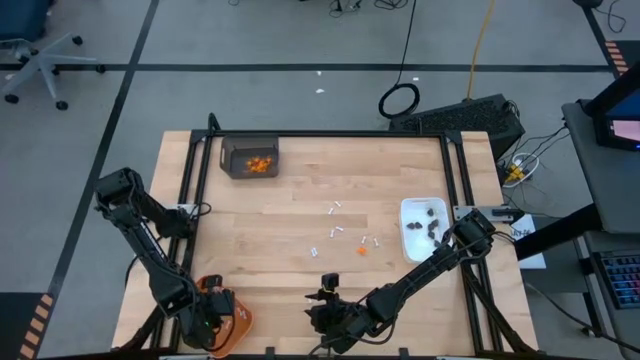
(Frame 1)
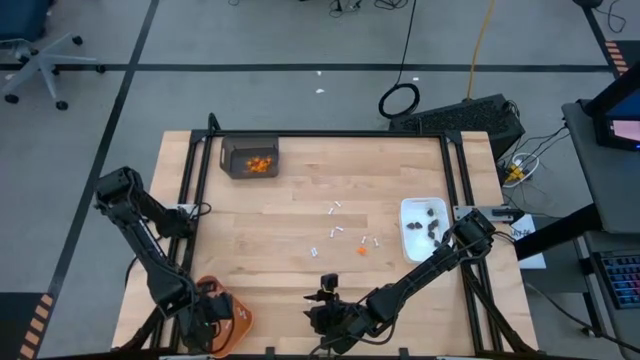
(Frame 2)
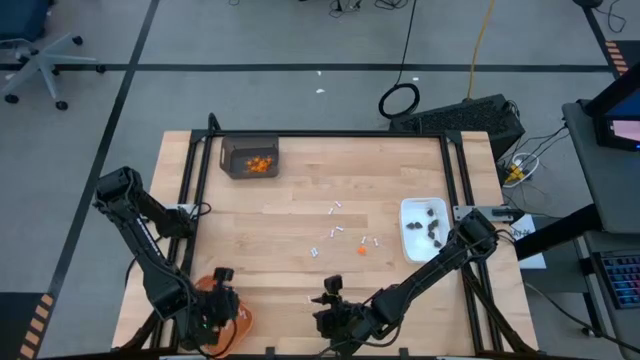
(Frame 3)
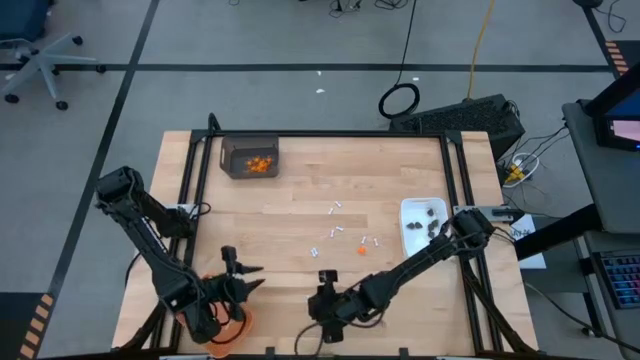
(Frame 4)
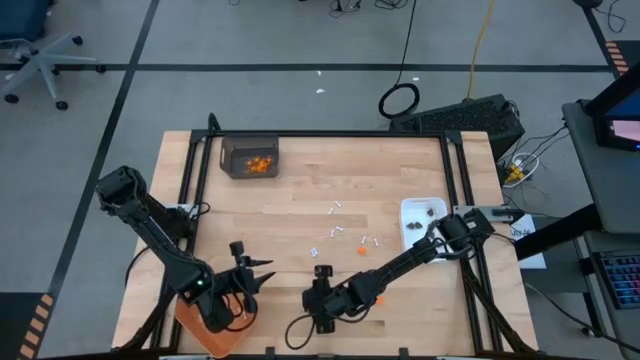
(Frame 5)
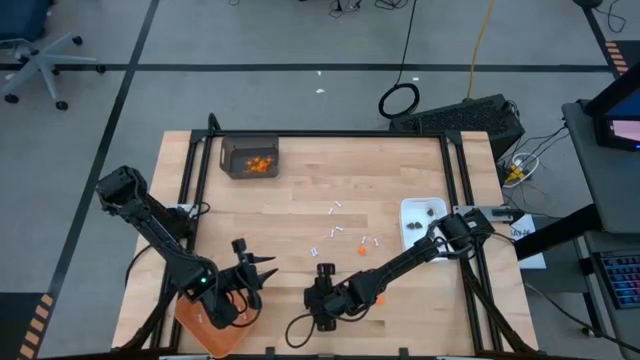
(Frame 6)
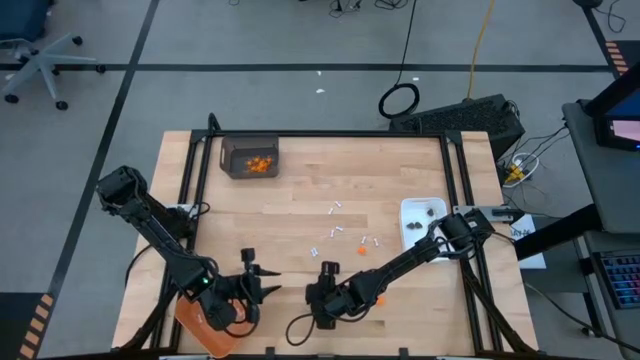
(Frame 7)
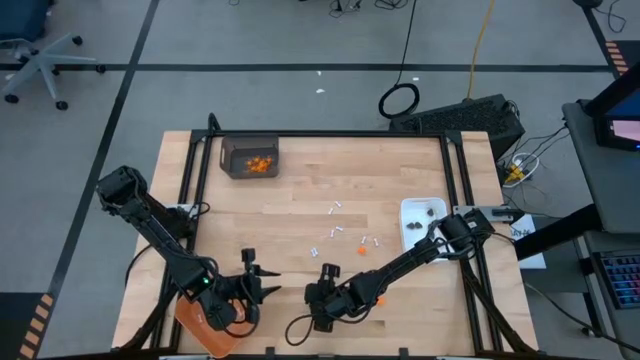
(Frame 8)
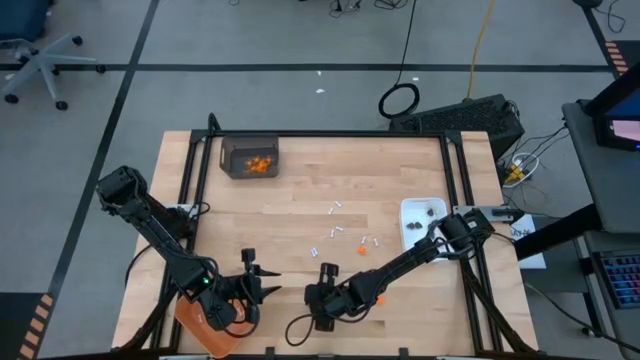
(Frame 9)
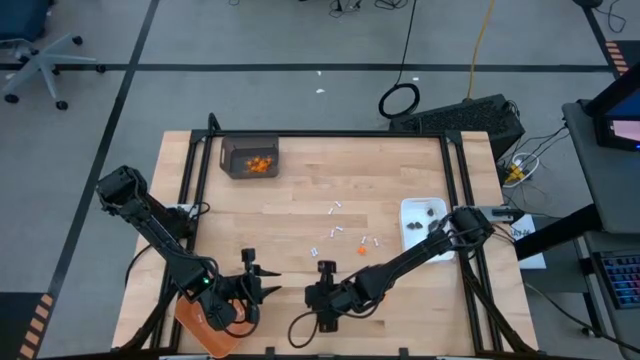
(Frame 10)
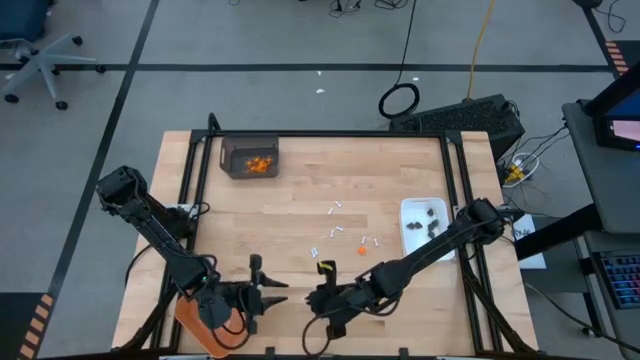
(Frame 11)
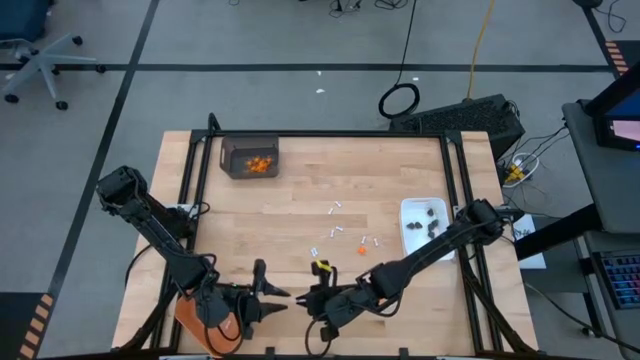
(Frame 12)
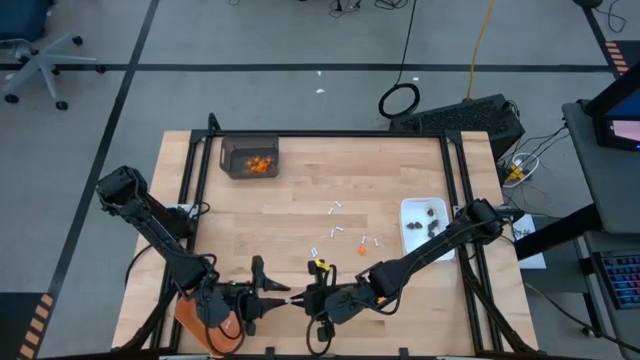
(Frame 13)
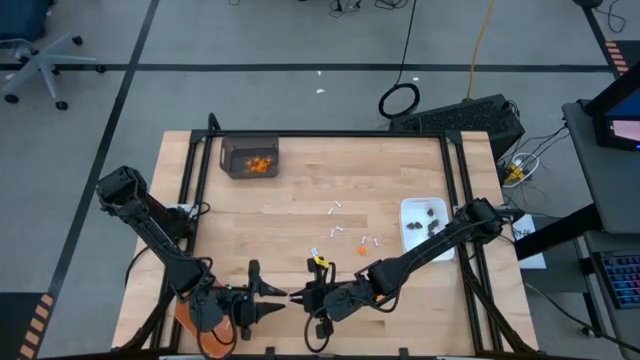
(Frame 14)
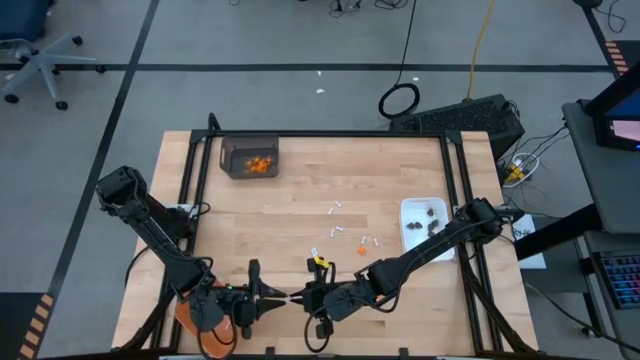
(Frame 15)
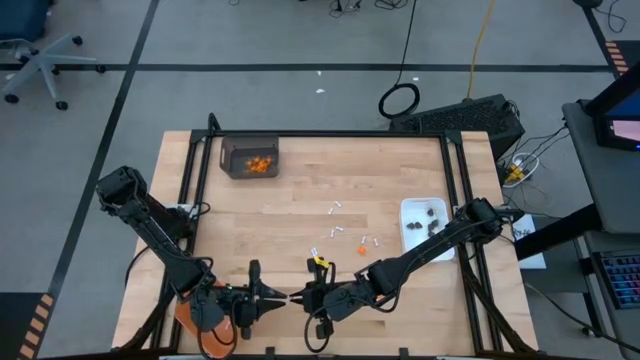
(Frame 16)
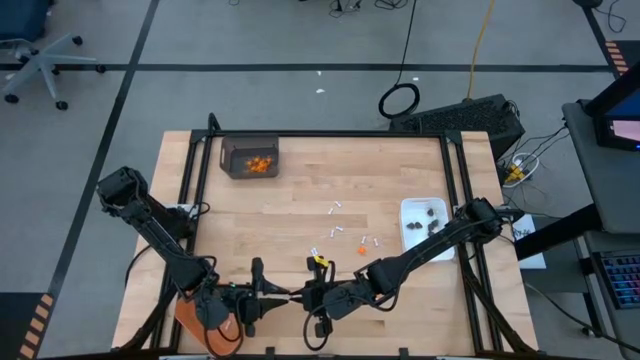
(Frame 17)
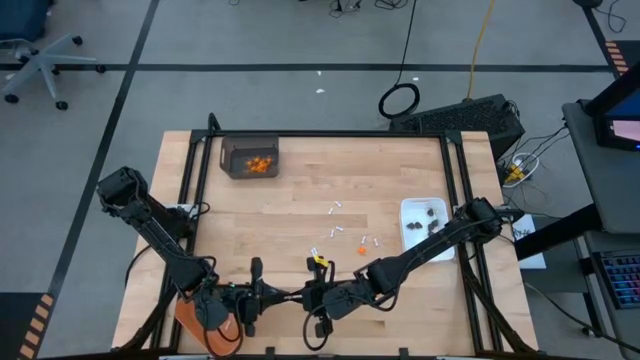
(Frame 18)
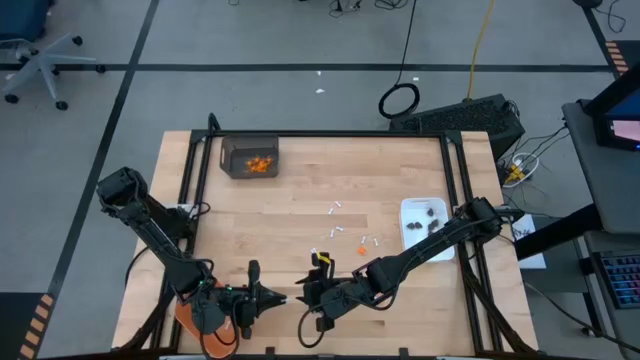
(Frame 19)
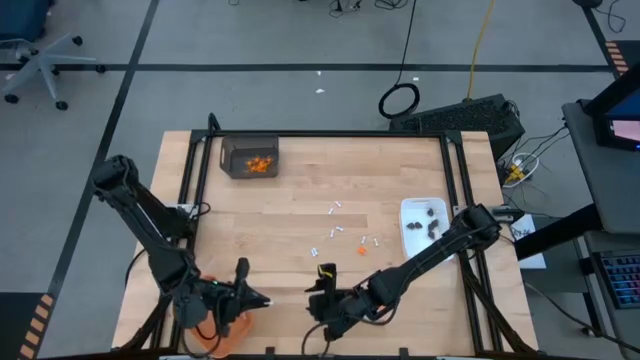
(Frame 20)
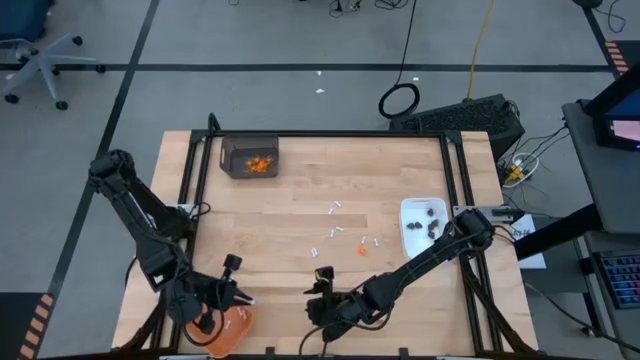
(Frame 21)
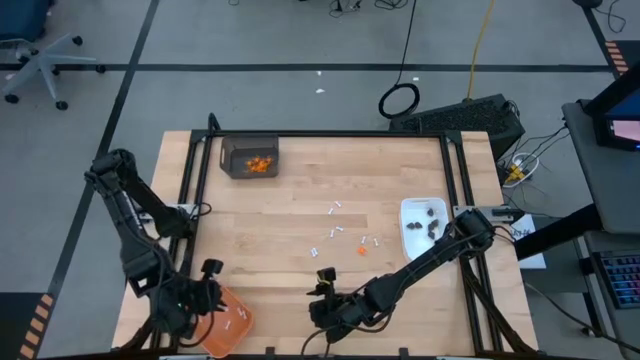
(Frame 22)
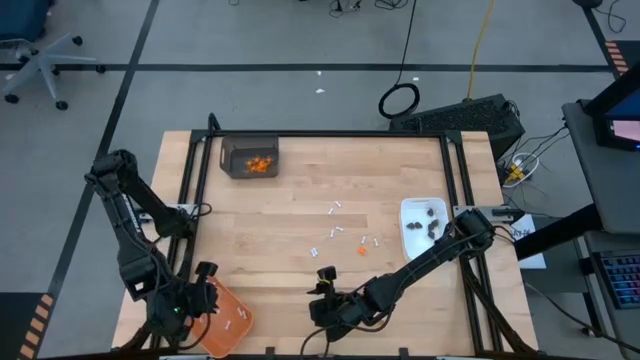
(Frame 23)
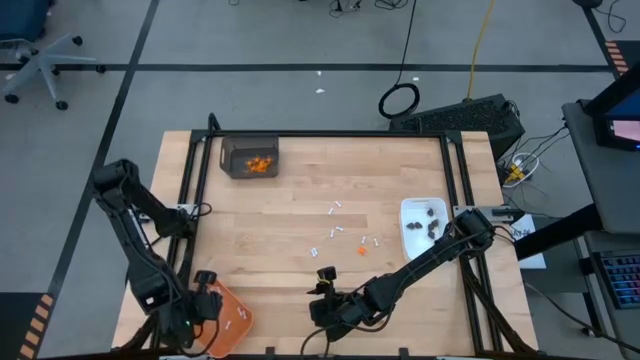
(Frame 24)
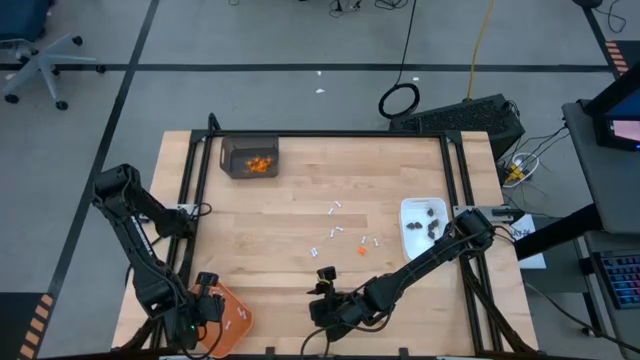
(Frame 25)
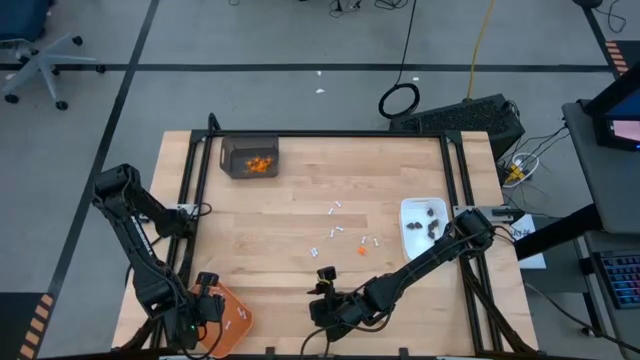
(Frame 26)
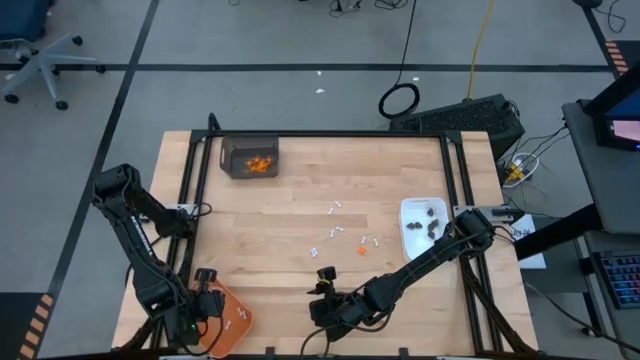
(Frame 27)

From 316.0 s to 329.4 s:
Task: Sort Halloween decoration
Put the white bone toy into the orange bin

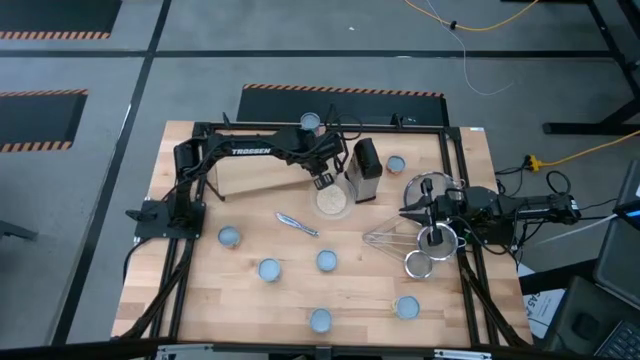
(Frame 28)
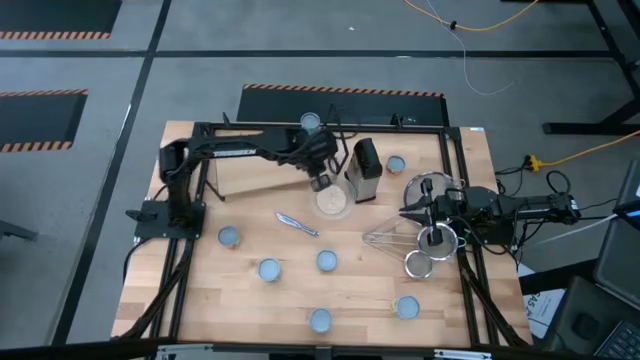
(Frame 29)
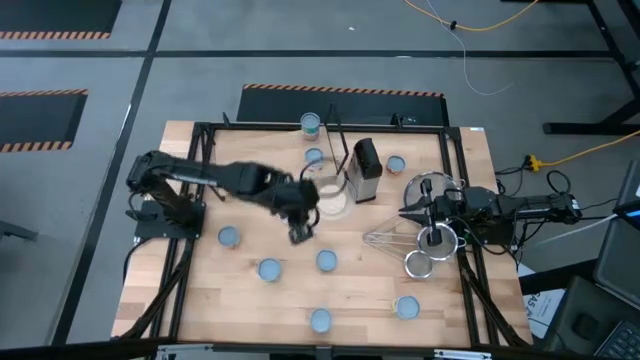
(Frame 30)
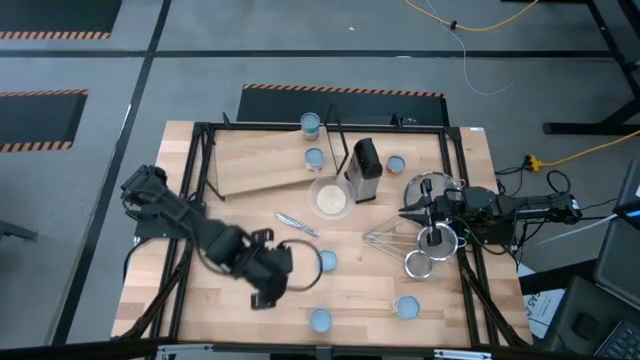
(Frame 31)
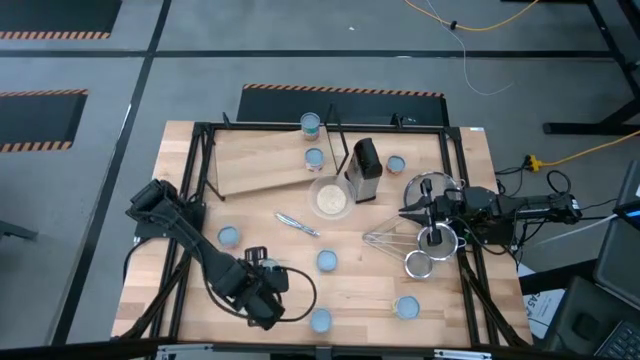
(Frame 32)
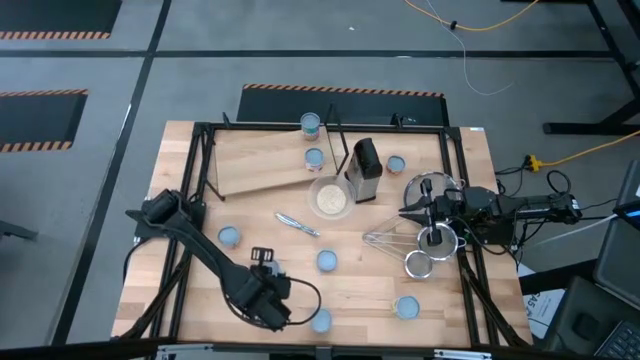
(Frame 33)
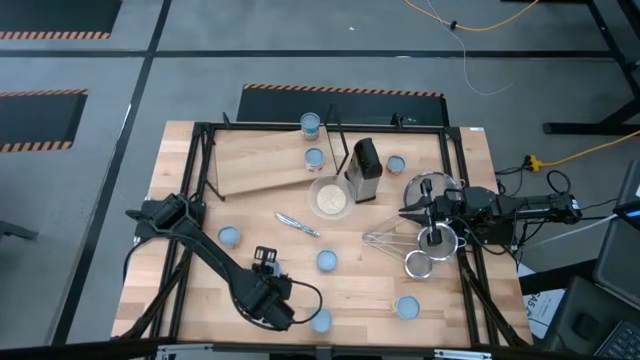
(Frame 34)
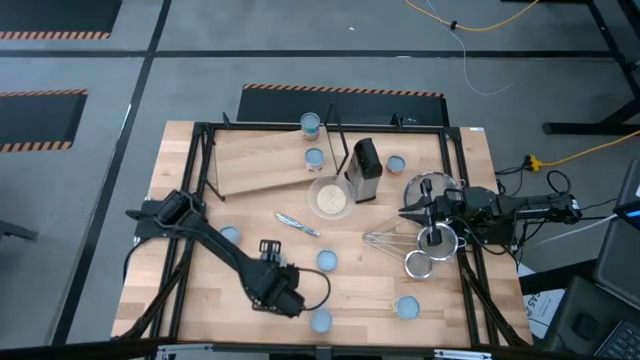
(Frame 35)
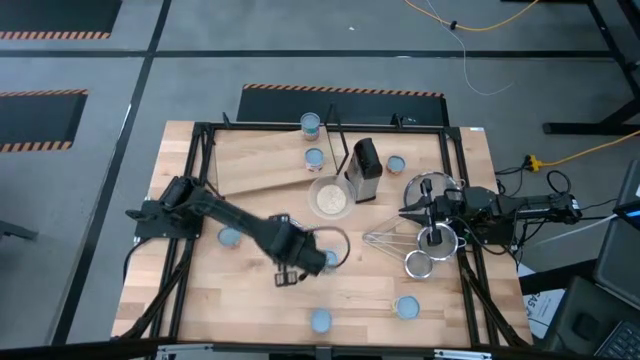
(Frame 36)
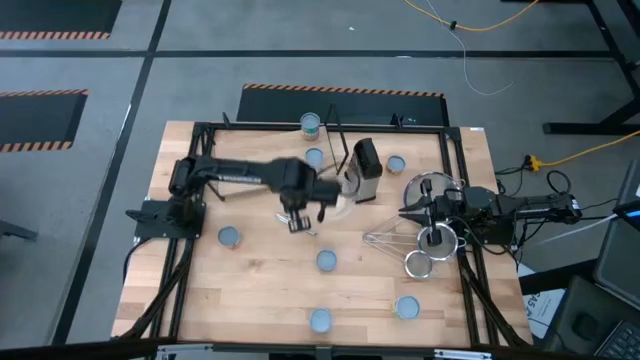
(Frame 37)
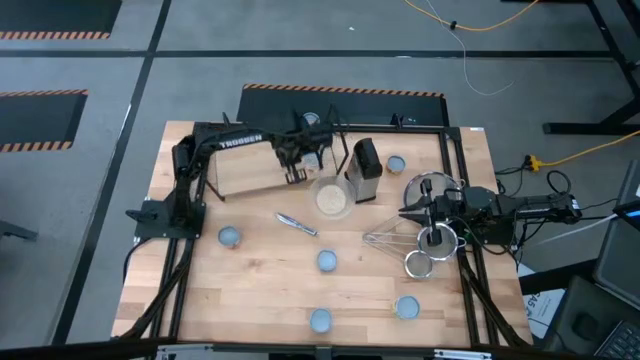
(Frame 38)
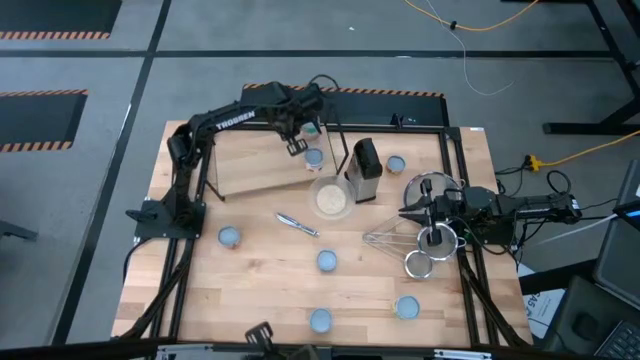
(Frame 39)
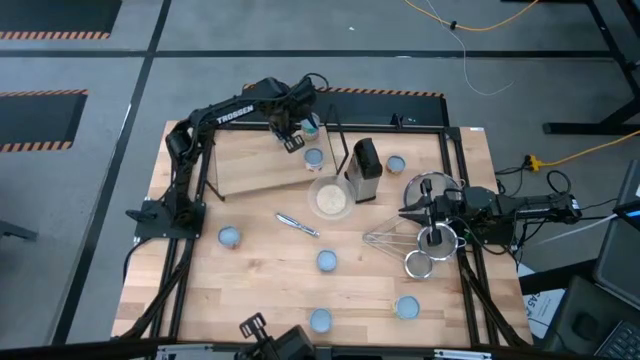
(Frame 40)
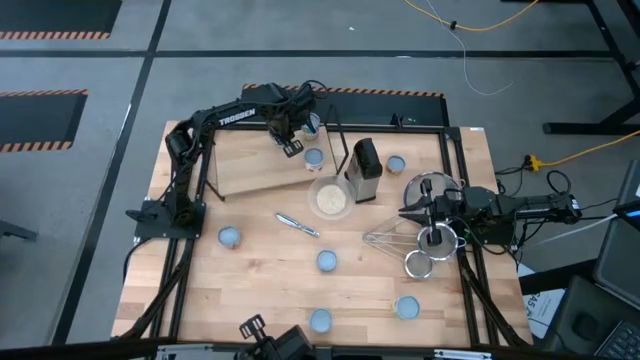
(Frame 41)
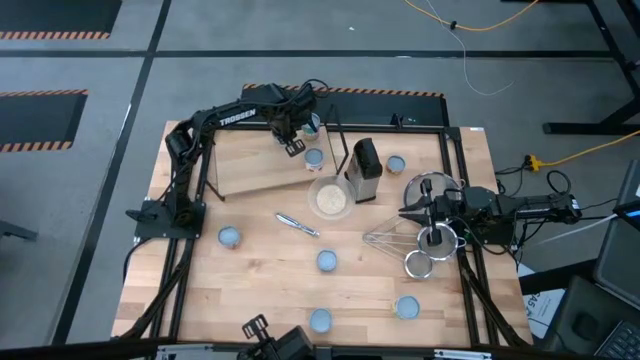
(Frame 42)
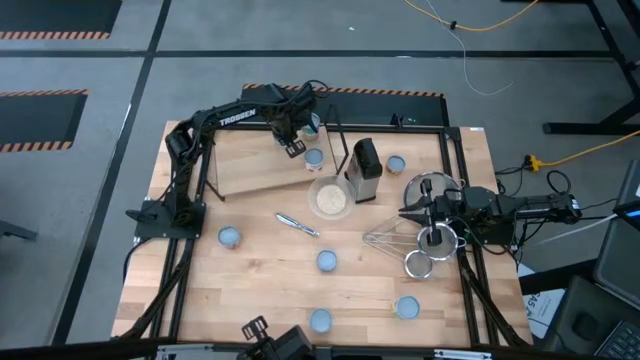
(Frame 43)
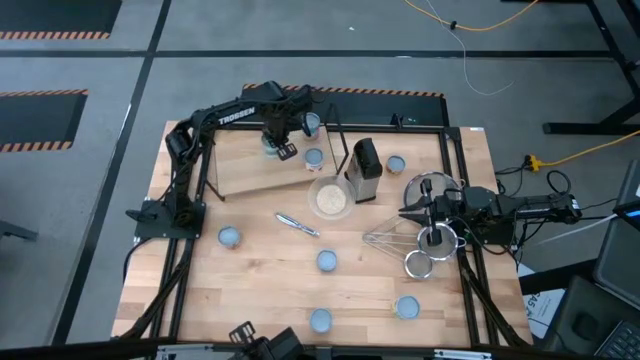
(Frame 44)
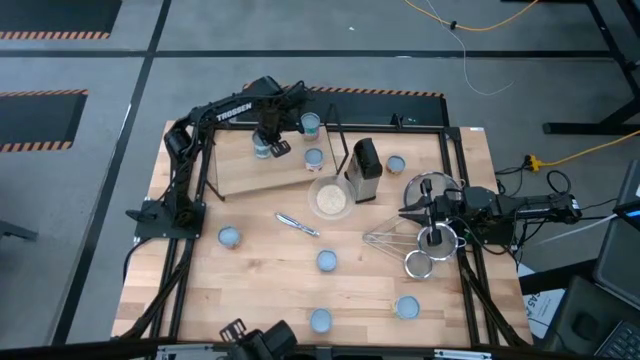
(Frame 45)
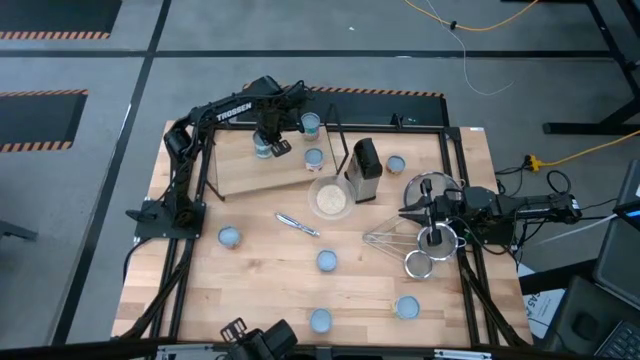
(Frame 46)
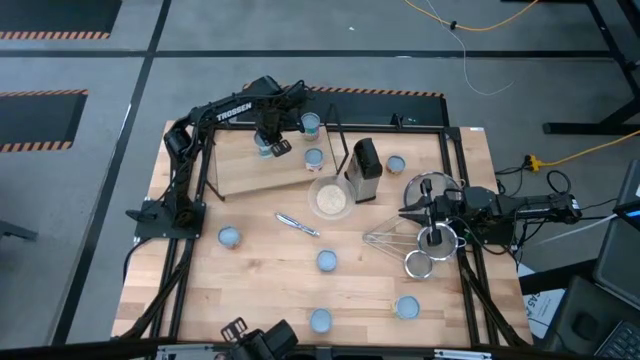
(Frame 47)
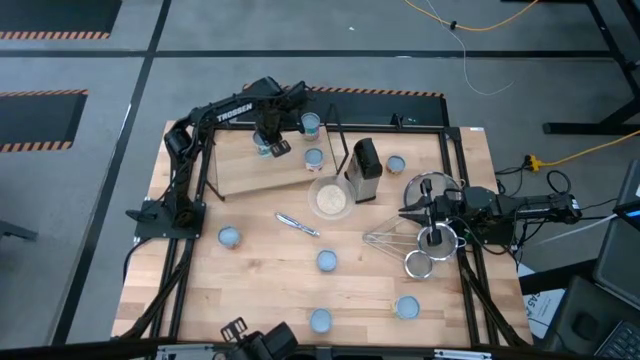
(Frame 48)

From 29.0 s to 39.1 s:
Task: Pick and place cans onto a shelf
Put the white can on the shelf
